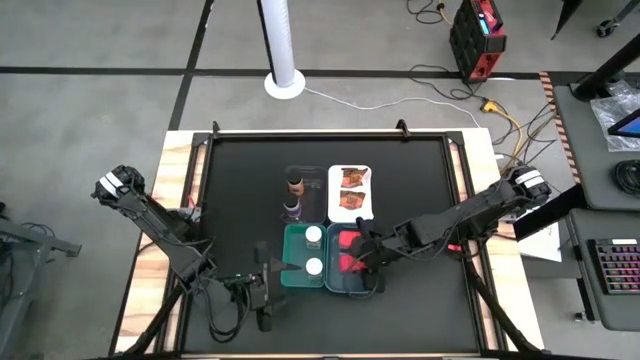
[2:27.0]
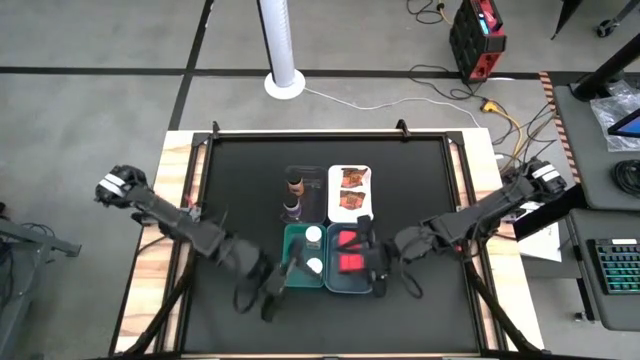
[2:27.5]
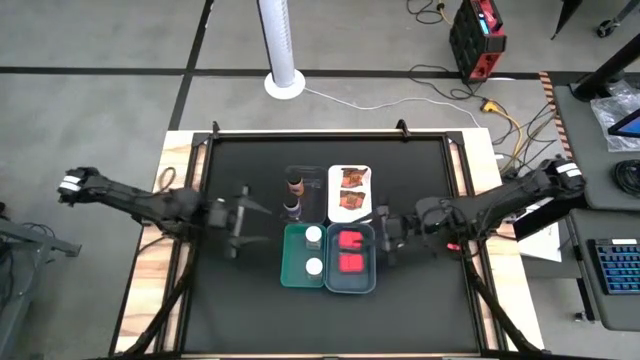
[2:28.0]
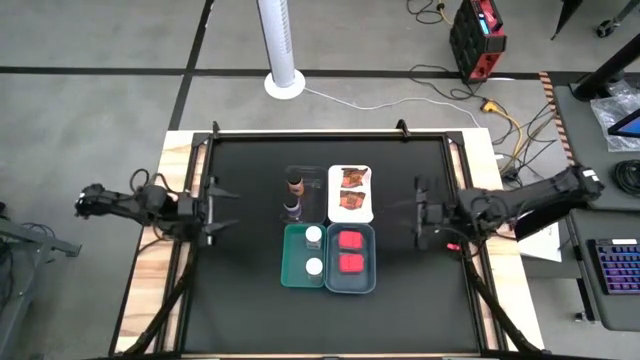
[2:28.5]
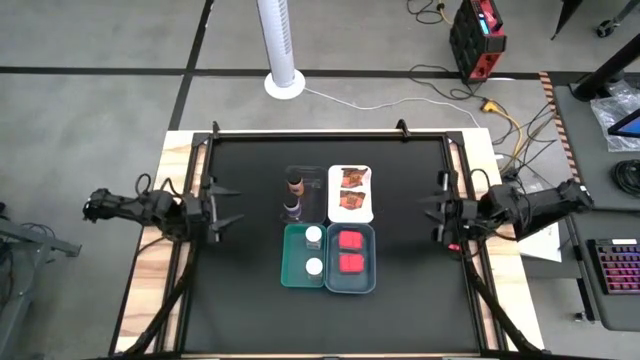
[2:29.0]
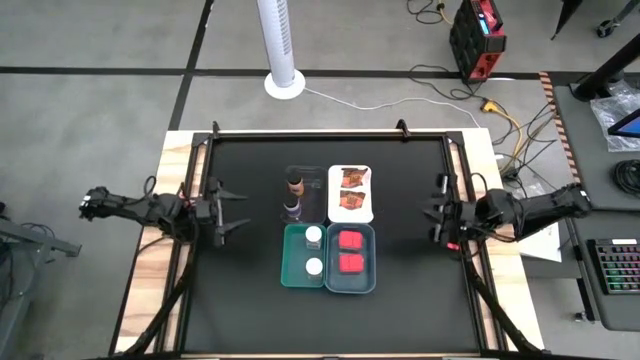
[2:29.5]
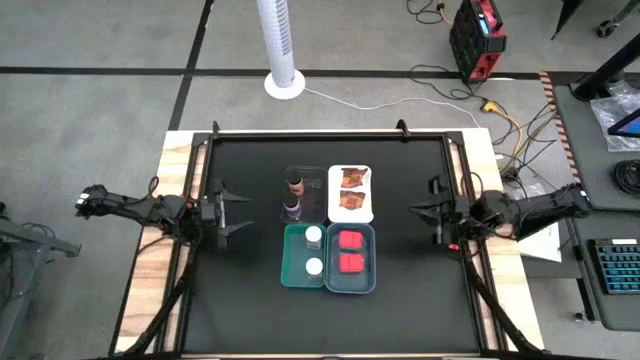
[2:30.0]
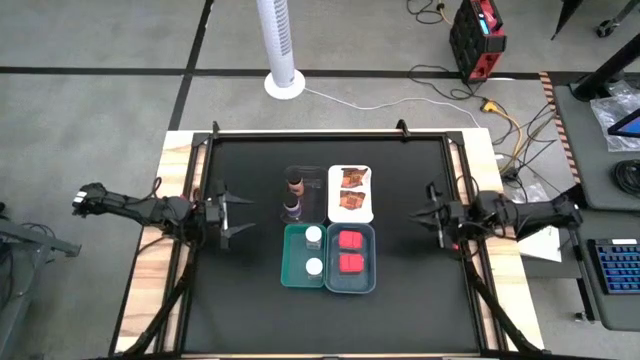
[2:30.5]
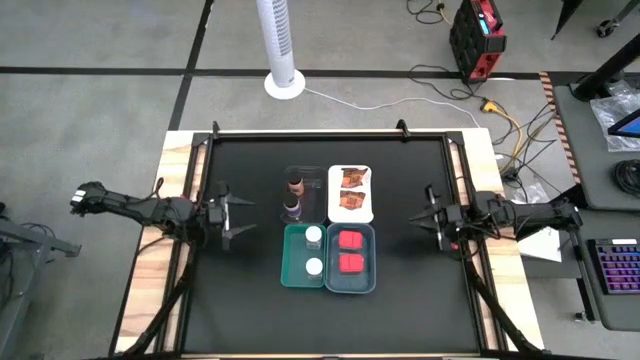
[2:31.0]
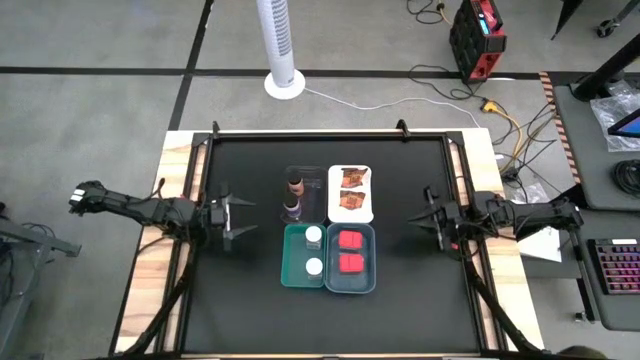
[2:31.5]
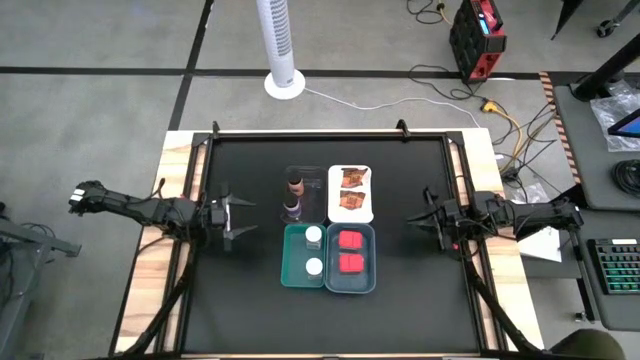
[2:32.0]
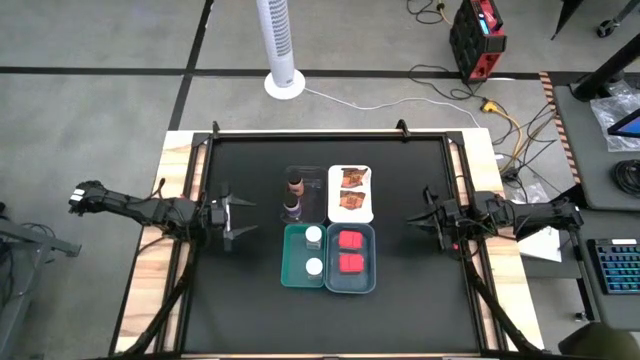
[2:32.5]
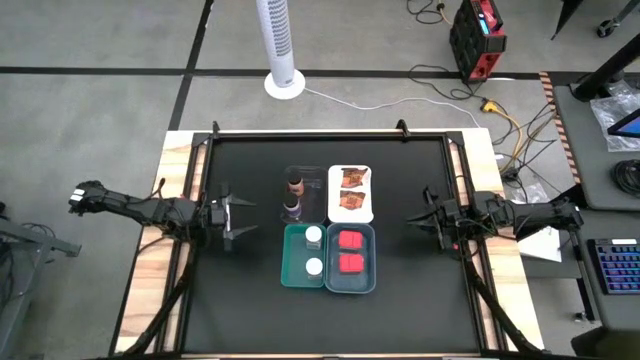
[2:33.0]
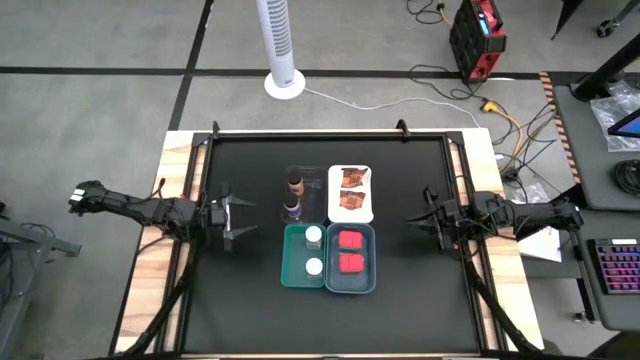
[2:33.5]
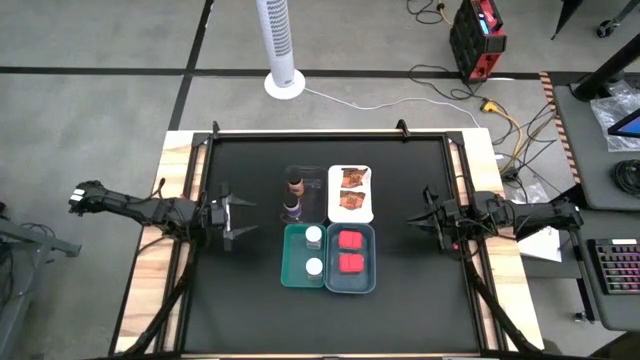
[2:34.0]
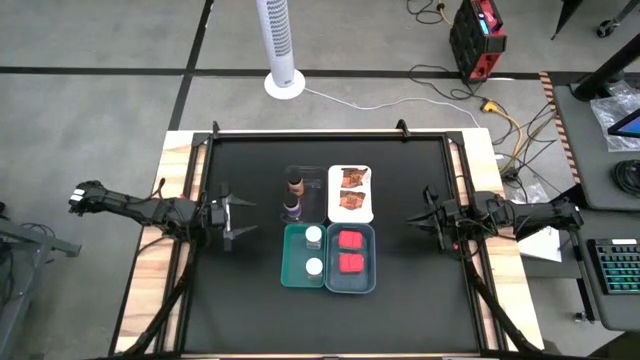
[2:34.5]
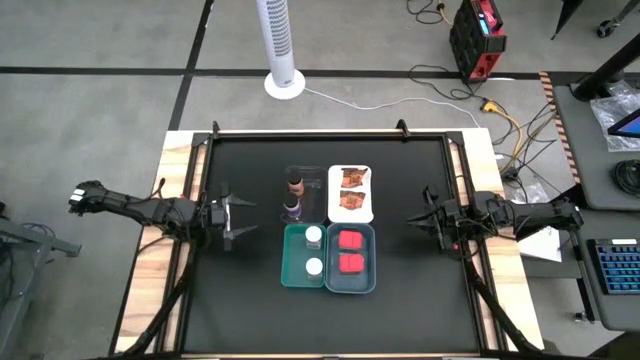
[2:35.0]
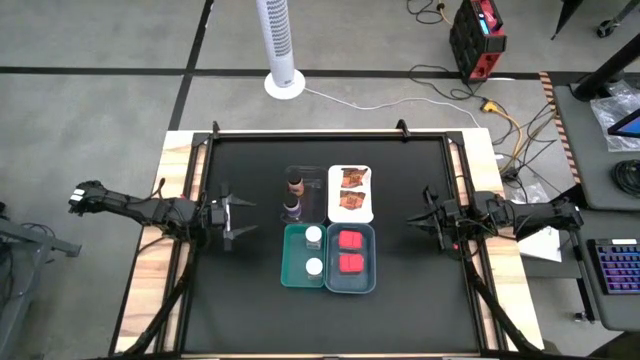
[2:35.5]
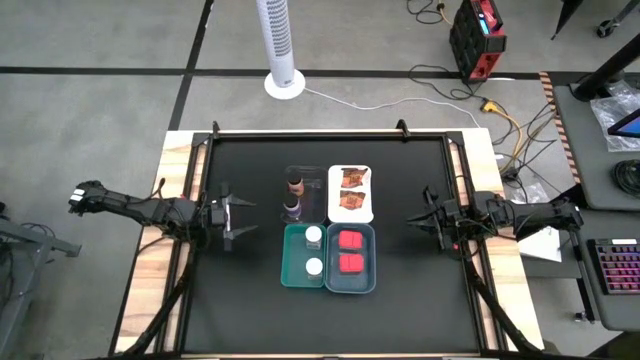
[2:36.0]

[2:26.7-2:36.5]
Task: Sort spices by type
Return to Home Position

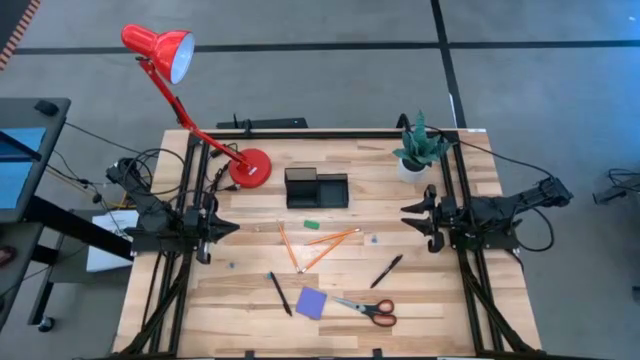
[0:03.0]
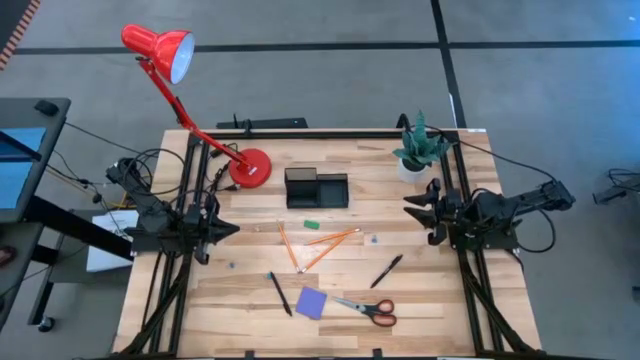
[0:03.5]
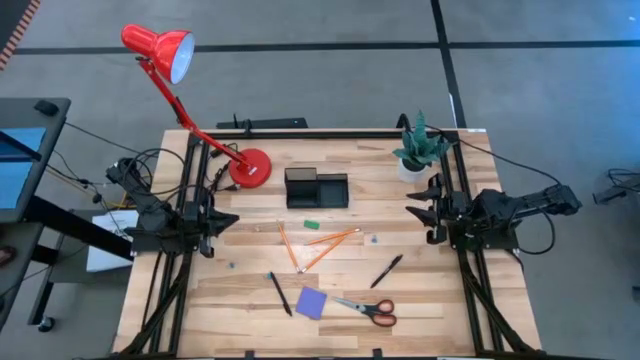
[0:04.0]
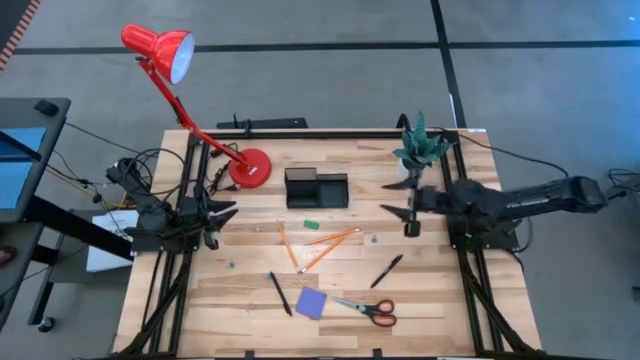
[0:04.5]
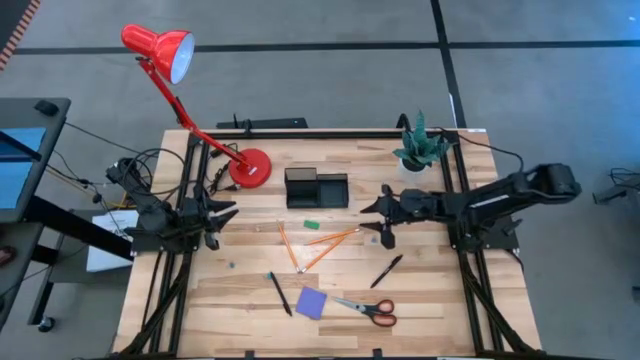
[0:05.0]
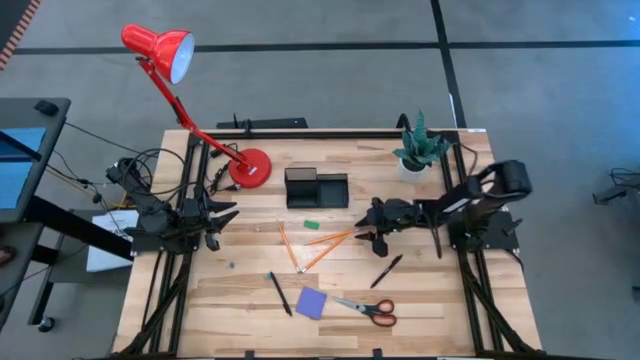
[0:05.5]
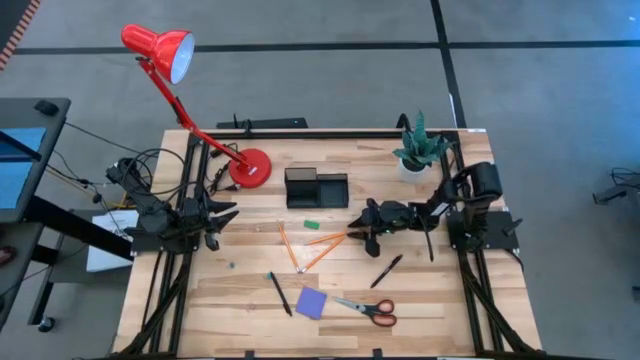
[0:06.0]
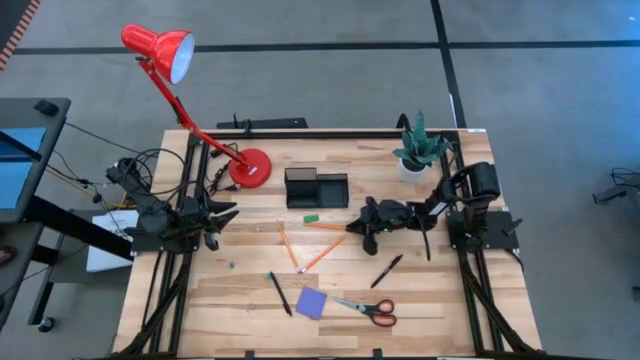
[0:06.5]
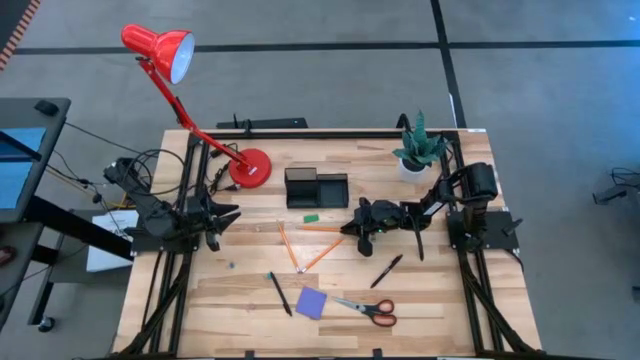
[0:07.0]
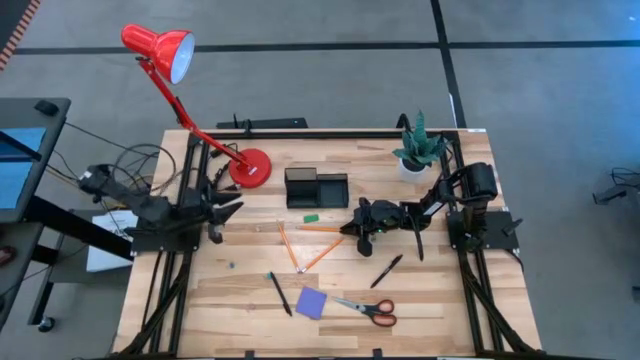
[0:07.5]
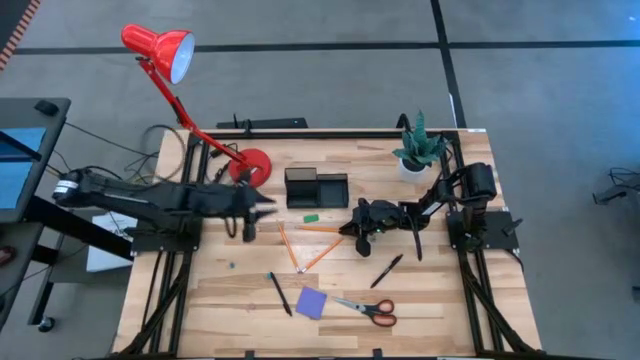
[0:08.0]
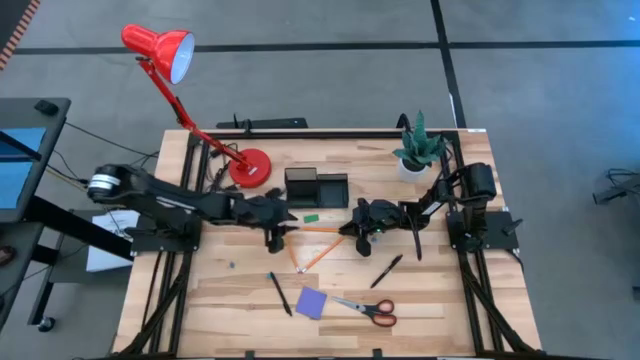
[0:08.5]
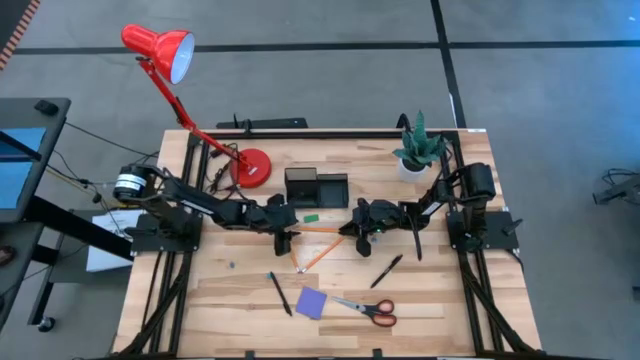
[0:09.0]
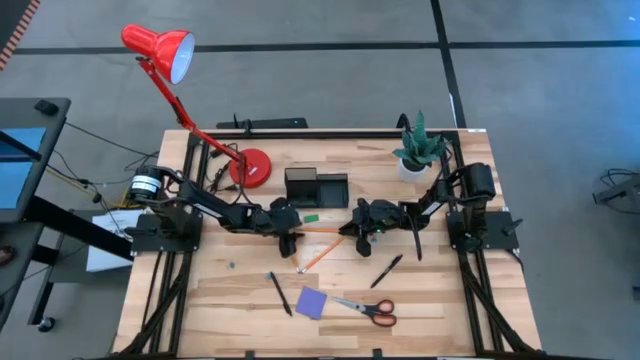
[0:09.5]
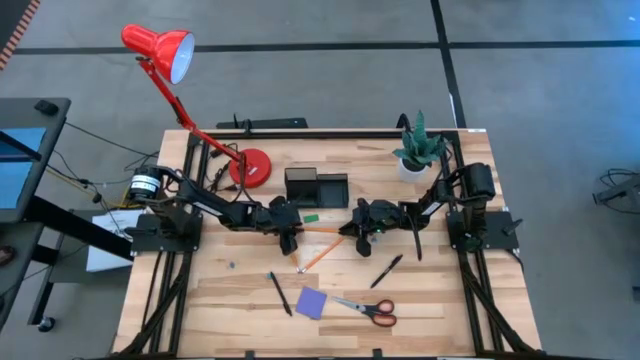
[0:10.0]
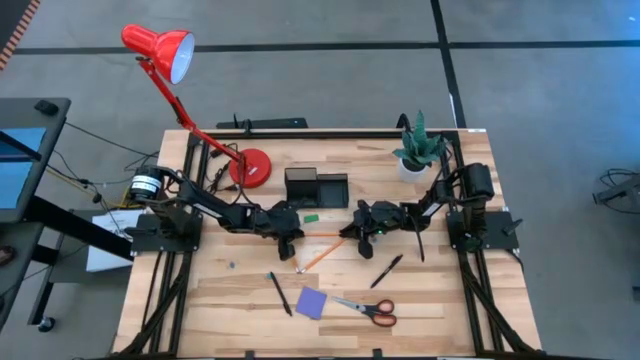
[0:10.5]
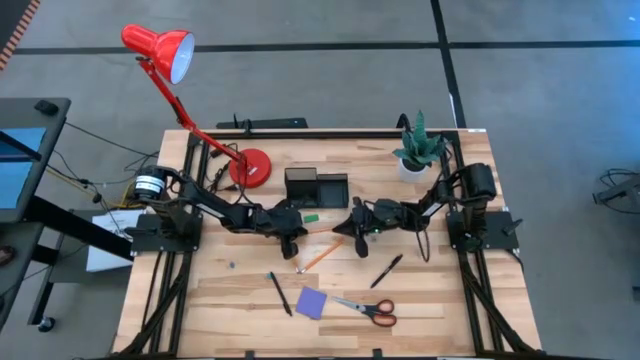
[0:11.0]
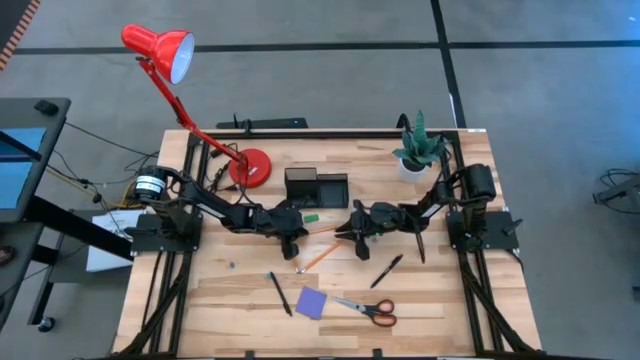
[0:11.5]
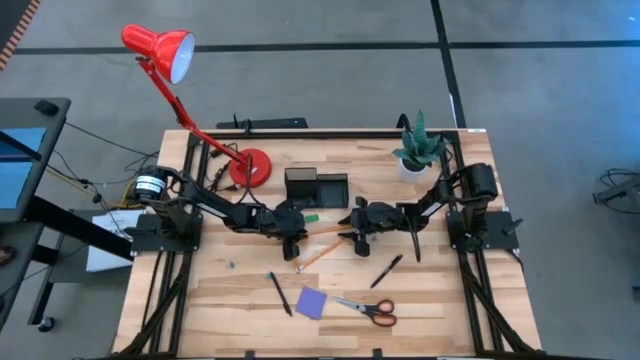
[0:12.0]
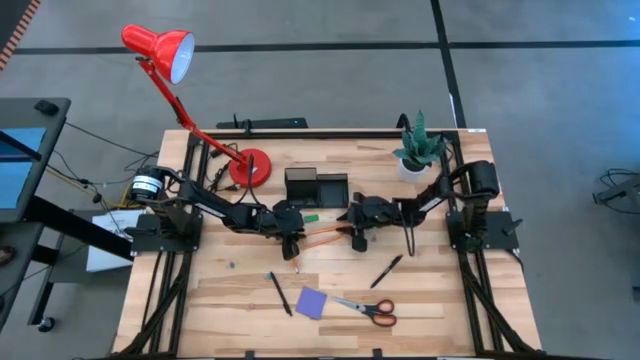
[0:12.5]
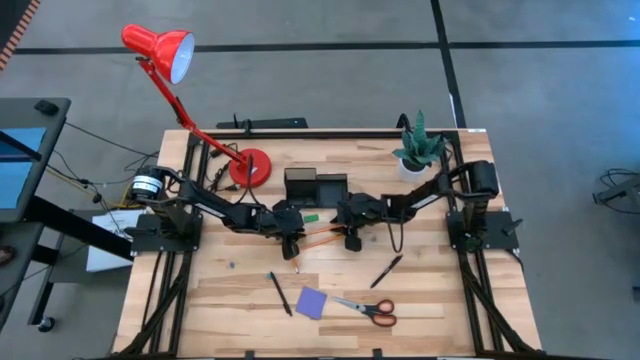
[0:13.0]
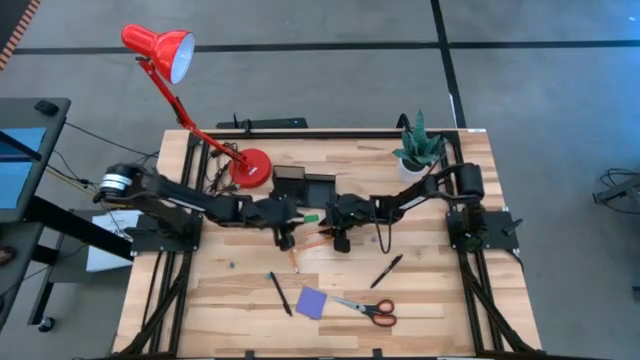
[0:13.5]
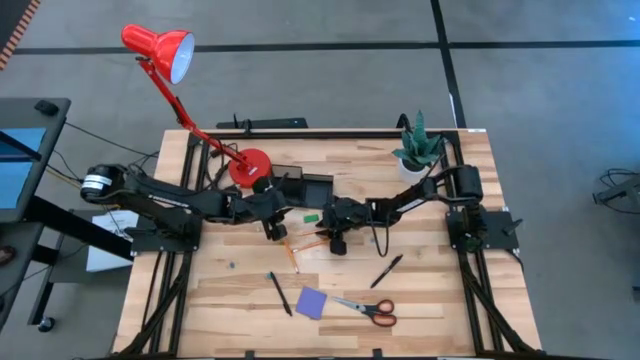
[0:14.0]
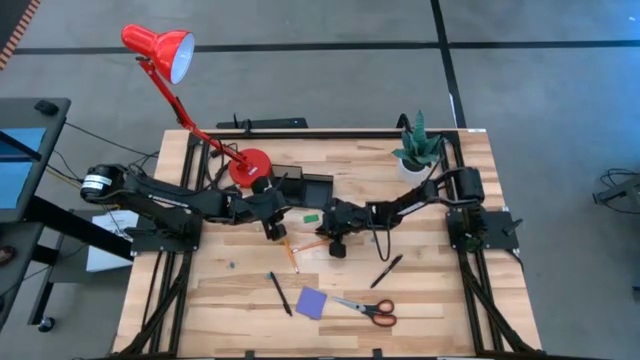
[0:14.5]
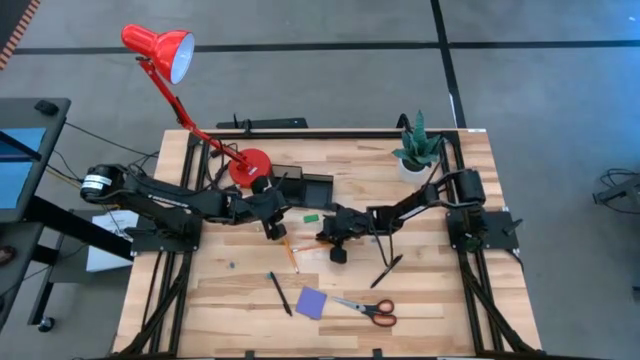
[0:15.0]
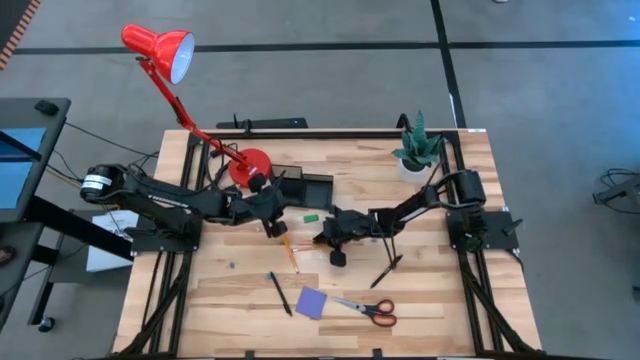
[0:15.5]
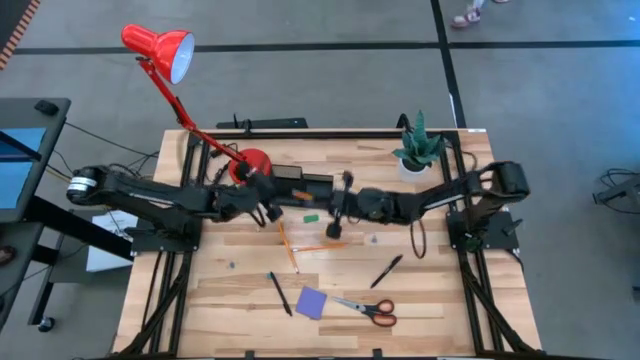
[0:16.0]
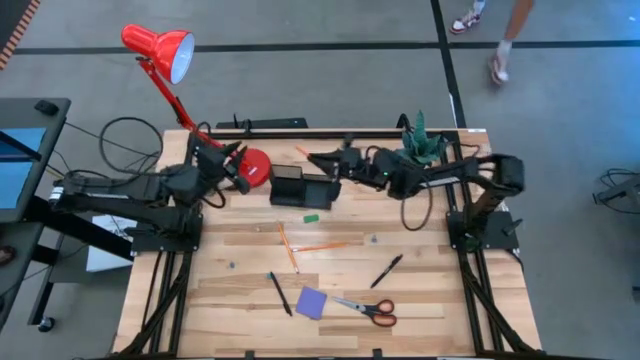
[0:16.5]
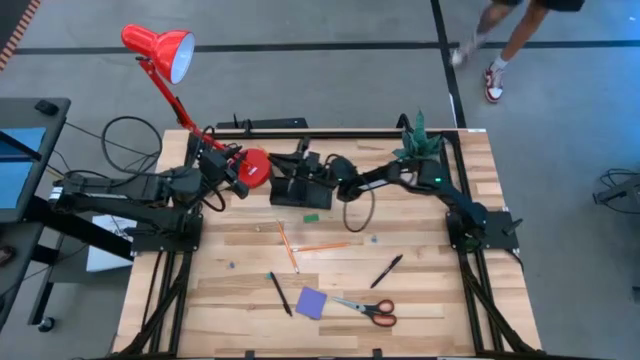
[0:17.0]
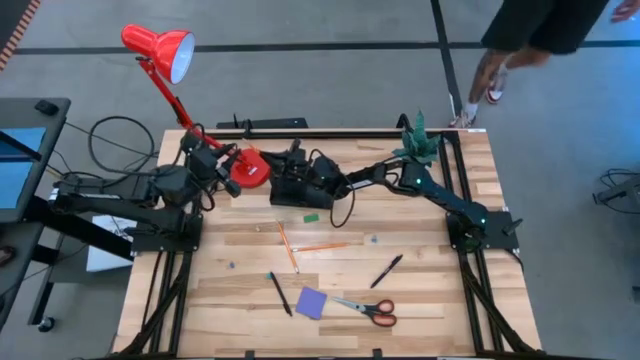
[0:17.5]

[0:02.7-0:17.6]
Task: Pick and place office supplies into organizer
Put the top yellow pencil into the black desk organizer
